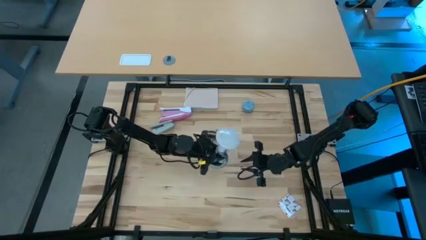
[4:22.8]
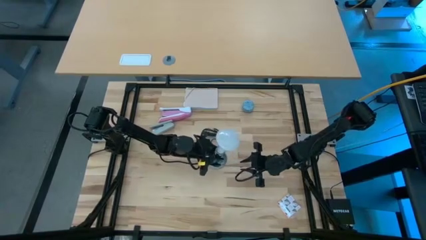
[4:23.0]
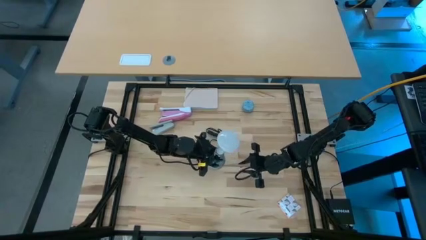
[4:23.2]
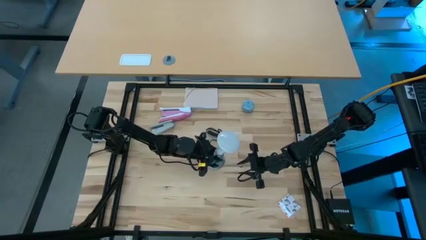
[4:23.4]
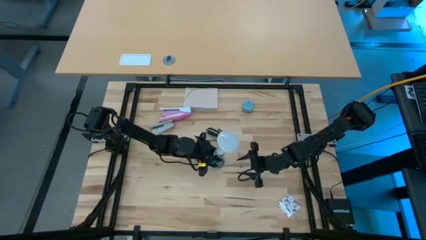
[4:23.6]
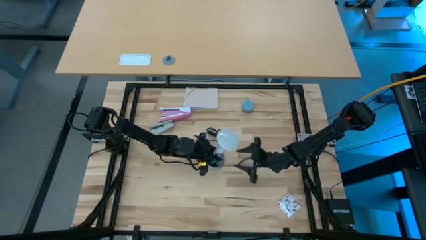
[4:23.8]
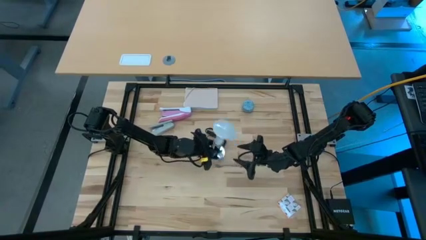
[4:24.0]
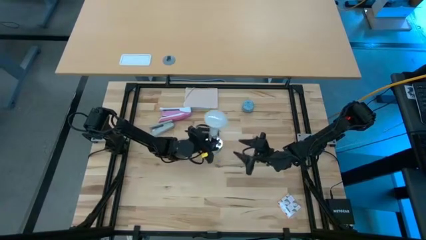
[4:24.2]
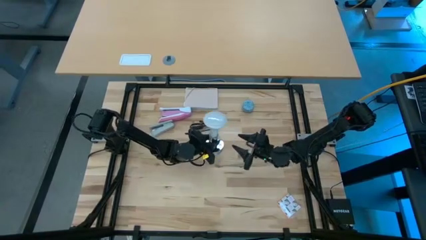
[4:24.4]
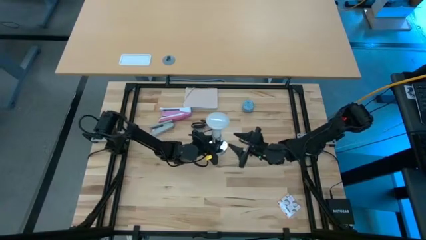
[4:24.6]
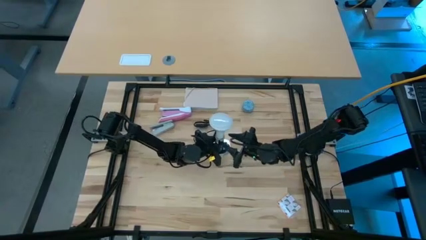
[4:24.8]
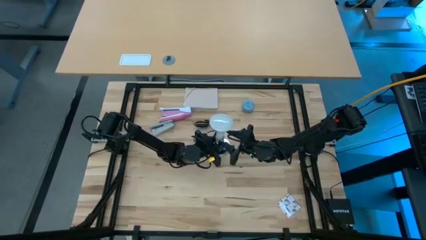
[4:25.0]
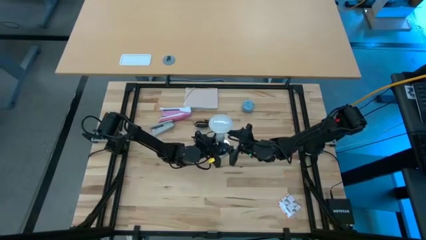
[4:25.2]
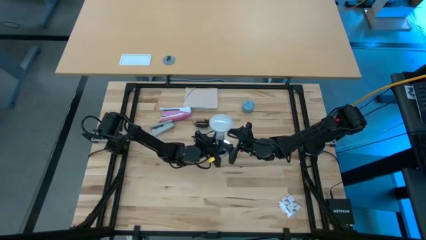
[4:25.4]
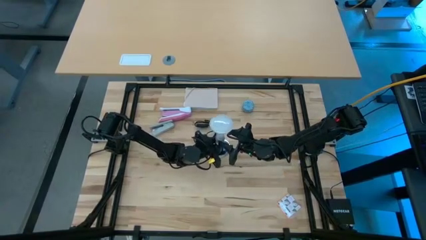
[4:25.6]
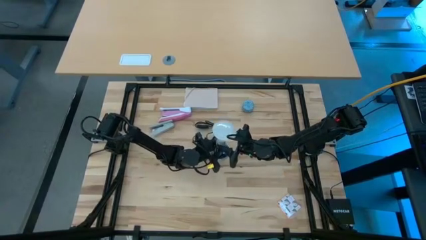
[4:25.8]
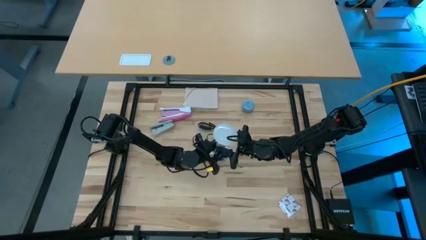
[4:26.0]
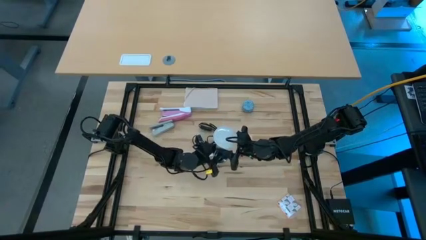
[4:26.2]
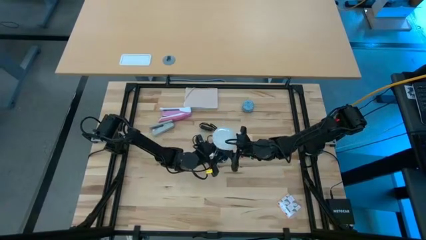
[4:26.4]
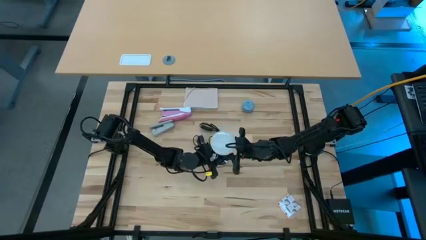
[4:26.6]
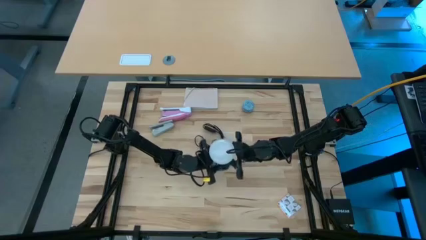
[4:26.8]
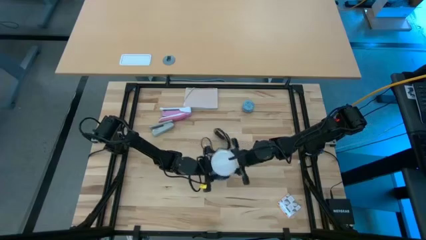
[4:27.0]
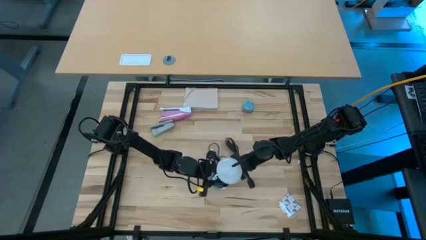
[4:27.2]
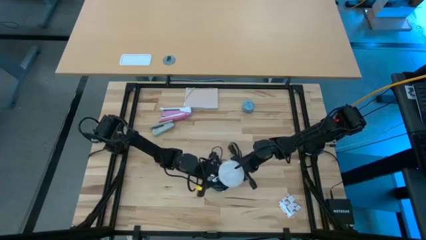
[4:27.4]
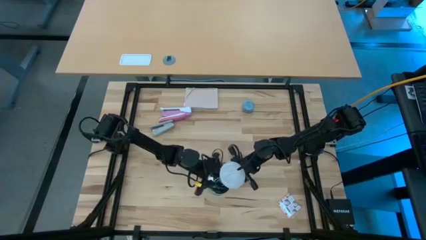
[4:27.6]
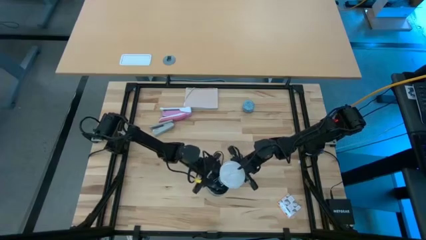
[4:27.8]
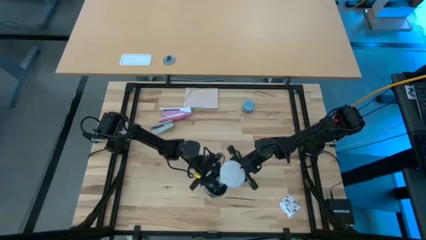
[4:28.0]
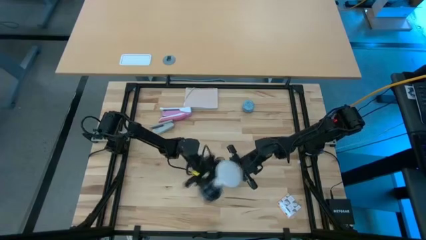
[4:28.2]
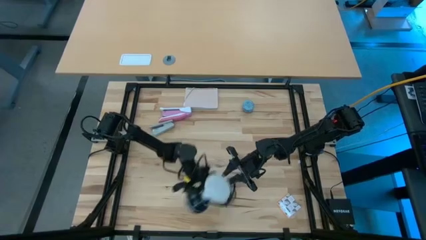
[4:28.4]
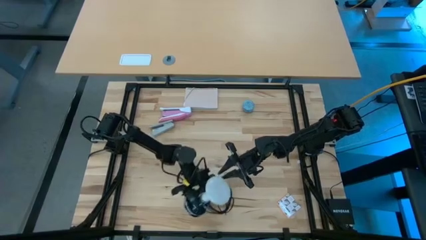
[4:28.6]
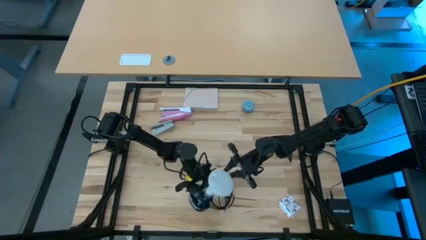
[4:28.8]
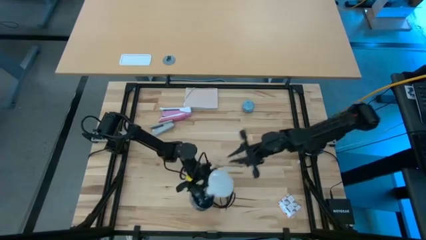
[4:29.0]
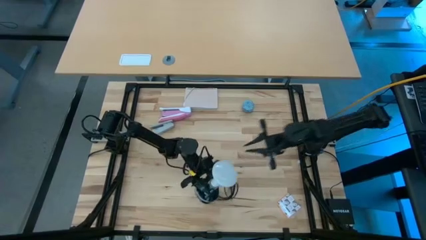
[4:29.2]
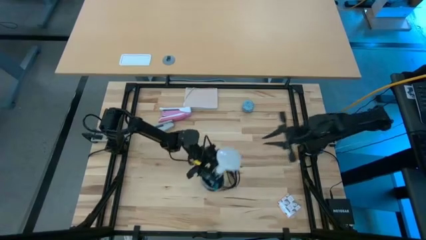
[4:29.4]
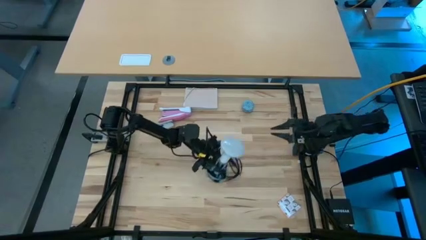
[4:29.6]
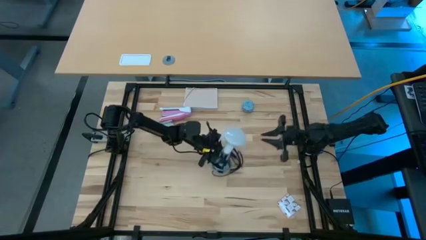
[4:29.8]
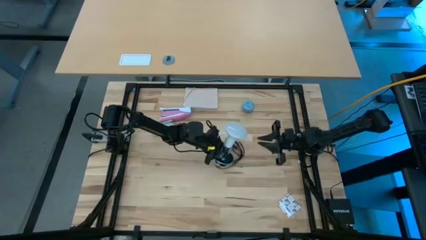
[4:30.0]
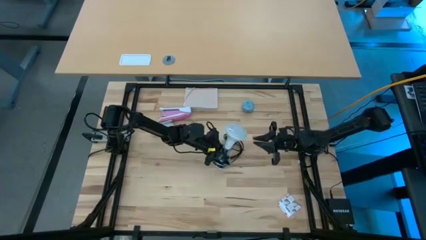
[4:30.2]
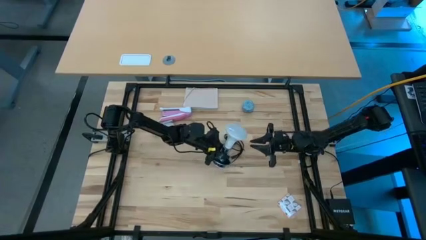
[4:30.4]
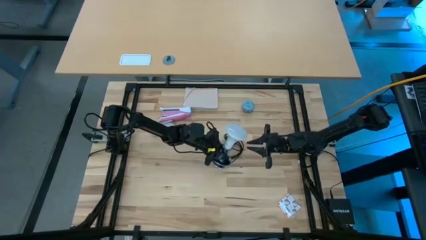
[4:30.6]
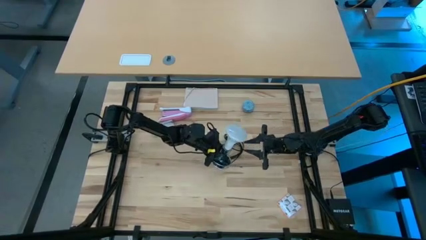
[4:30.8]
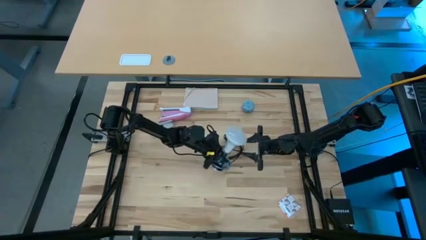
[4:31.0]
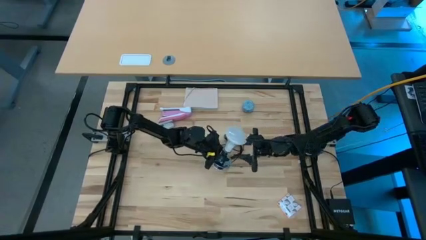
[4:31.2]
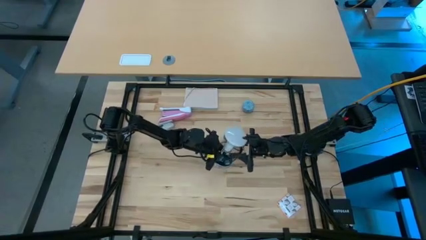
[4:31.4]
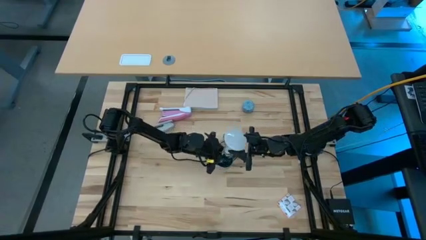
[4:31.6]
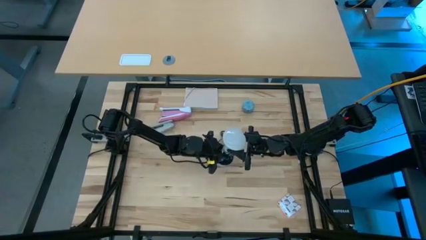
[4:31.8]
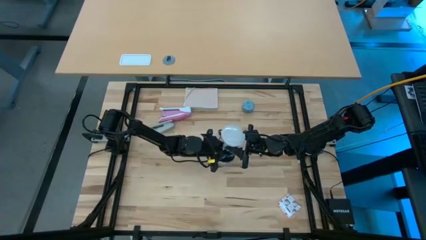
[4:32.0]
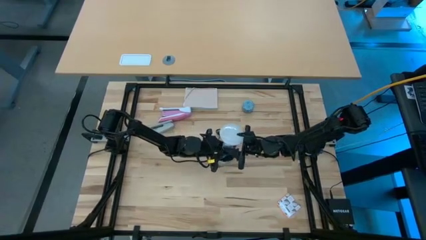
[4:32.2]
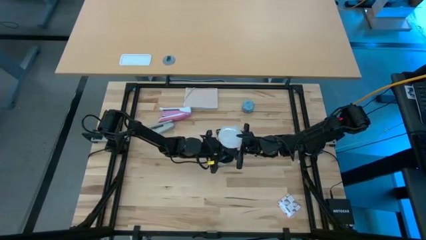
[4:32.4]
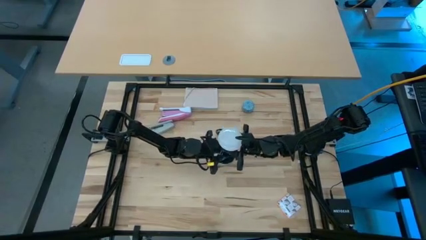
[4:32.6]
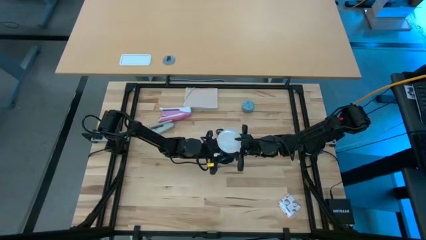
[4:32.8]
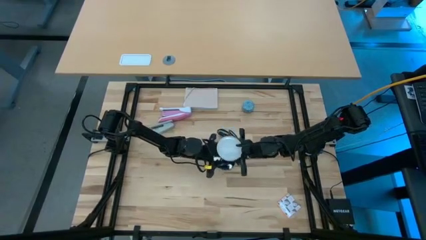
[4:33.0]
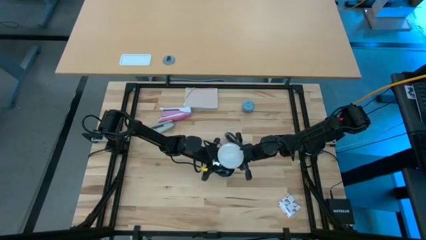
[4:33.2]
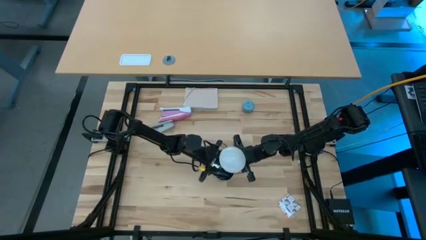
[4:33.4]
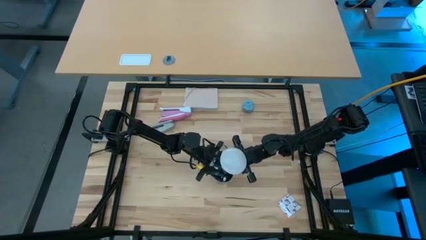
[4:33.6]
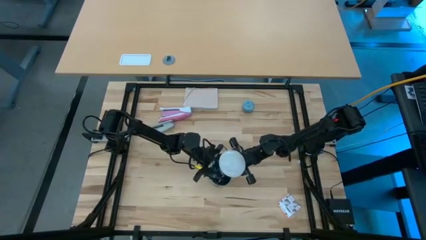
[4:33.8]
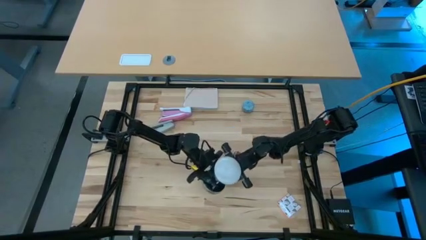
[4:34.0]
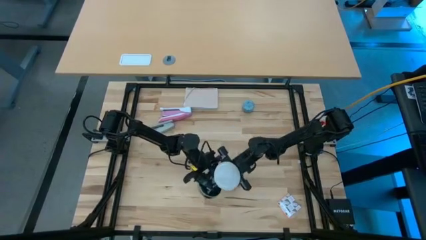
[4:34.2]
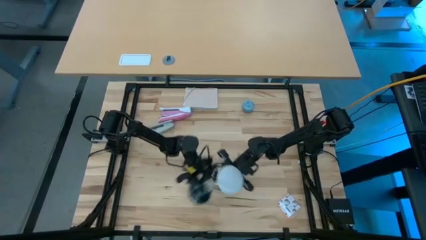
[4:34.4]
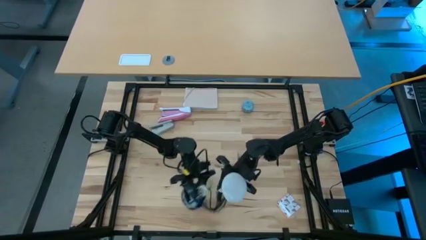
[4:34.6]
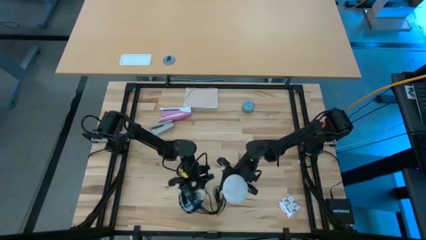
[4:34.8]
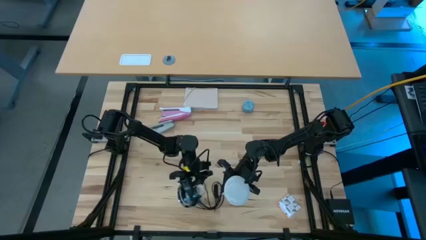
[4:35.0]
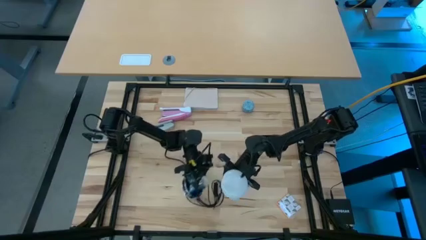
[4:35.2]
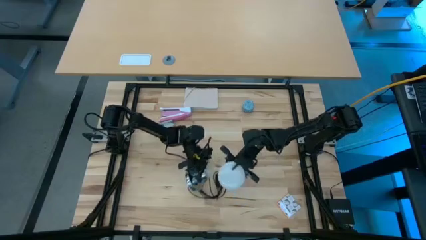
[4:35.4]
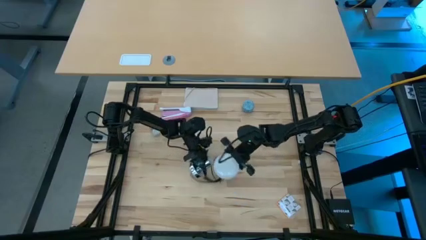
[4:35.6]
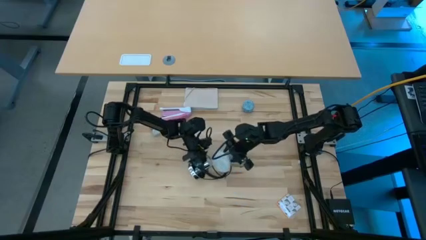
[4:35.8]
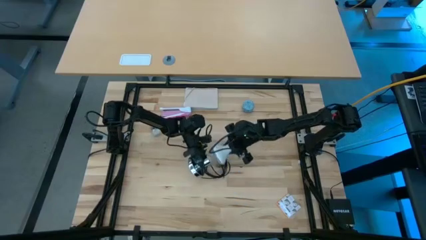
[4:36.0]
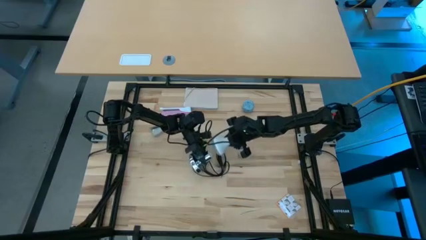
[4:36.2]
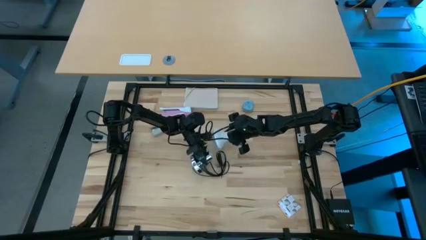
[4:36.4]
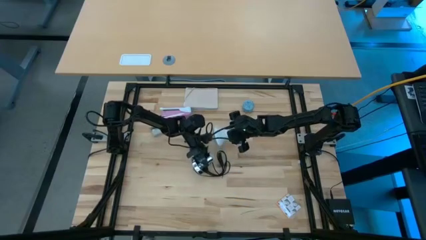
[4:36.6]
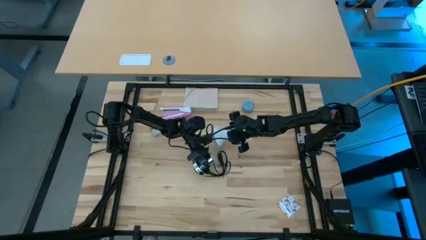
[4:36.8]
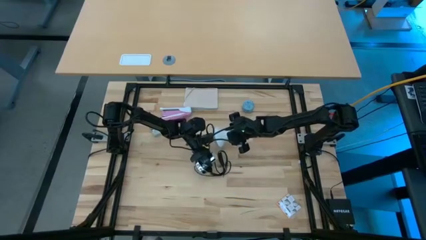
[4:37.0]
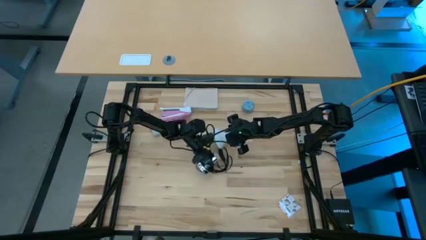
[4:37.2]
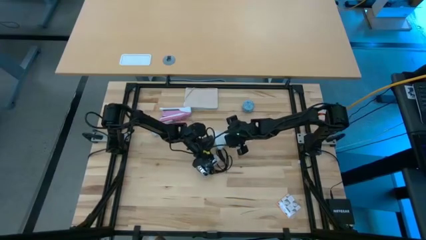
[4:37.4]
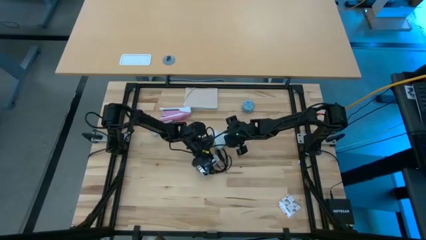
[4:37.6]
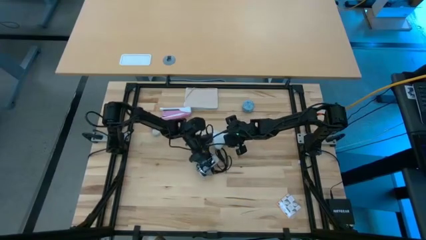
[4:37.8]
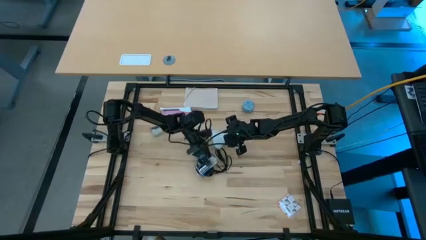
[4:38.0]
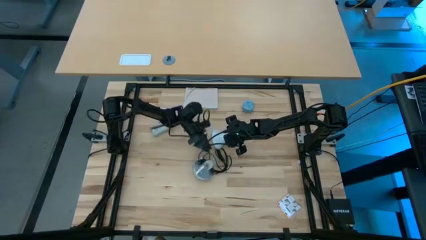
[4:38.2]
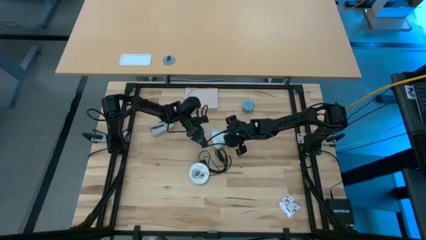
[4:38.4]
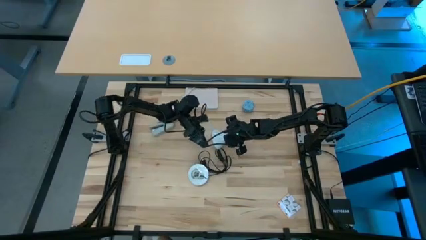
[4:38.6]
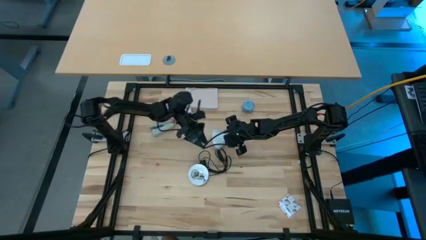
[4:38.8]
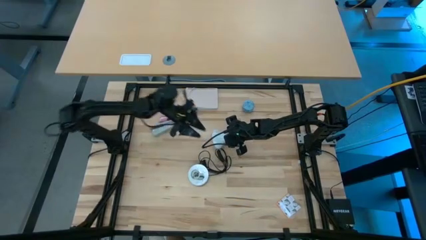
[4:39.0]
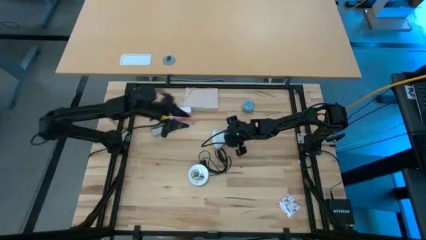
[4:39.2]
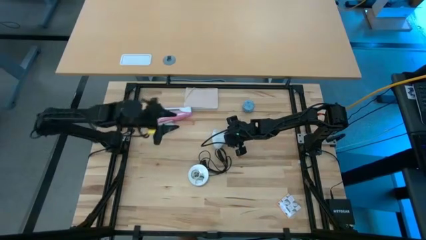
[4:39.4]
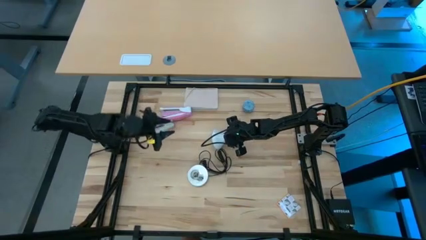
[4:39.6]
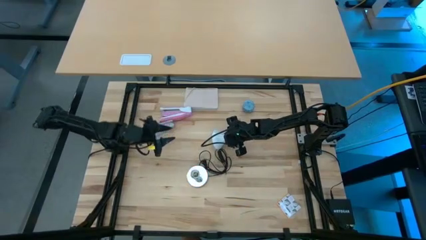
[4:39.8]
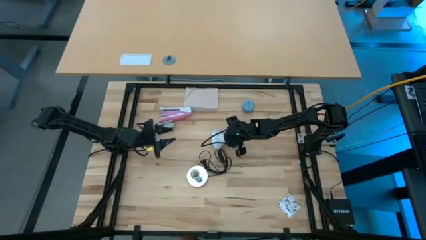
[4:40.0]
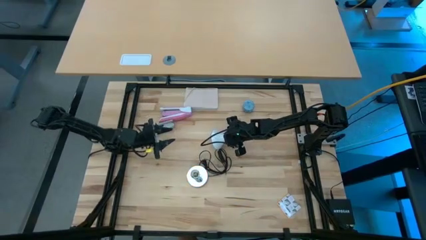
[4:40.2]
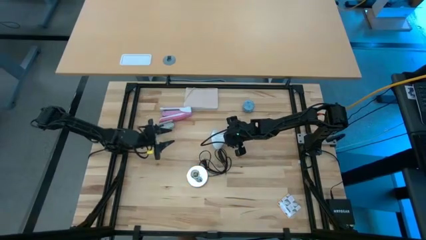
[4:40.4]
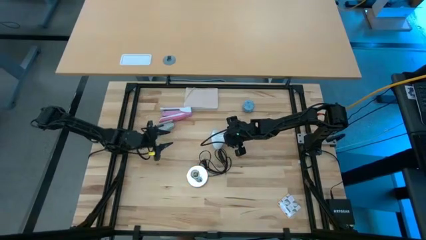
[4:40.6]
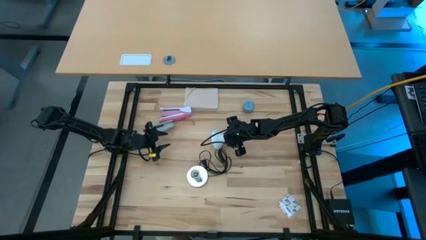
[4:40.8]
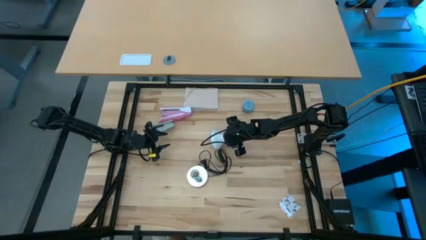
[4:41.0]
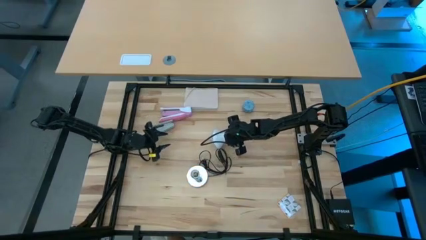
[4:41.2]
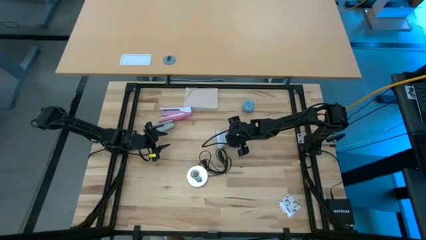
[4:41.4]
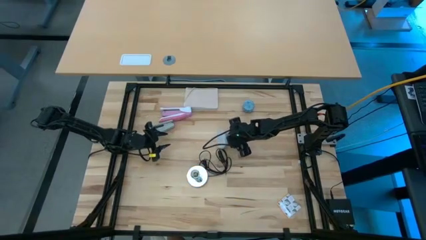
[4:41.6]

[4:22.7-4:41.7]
Task: Screw lightbulb
Remove the white lightbulb from the desk lamp
